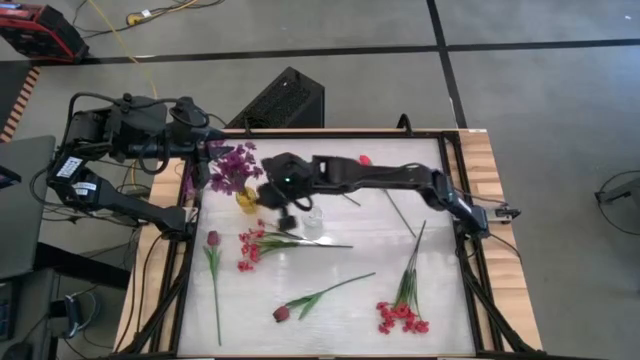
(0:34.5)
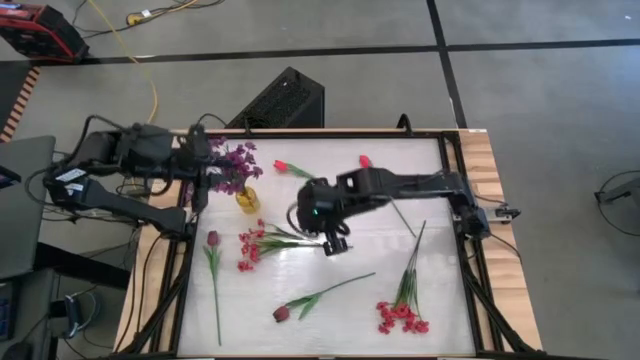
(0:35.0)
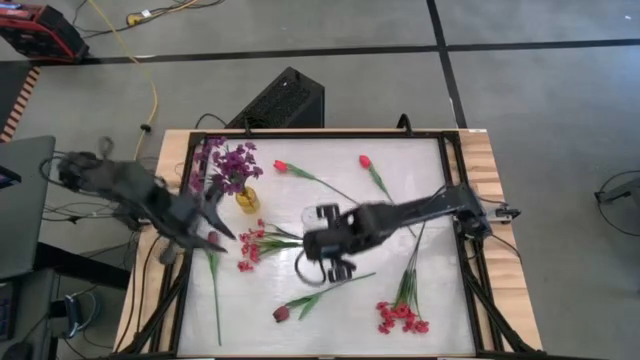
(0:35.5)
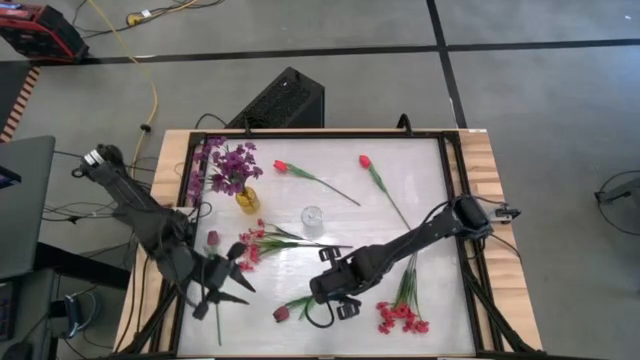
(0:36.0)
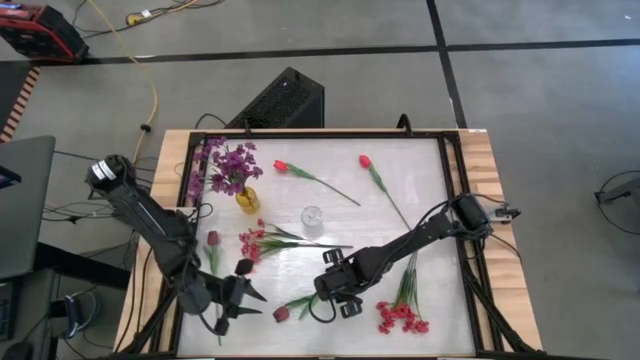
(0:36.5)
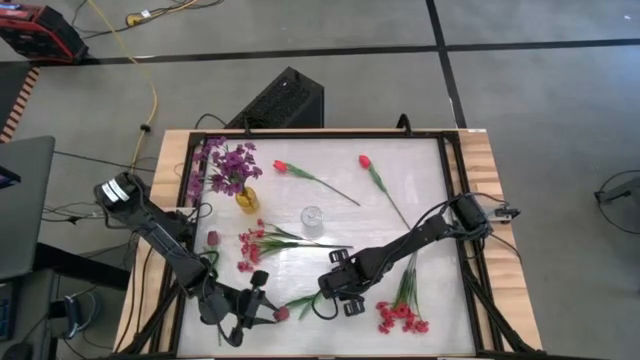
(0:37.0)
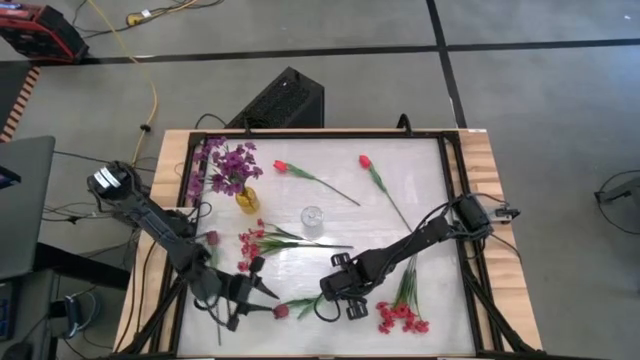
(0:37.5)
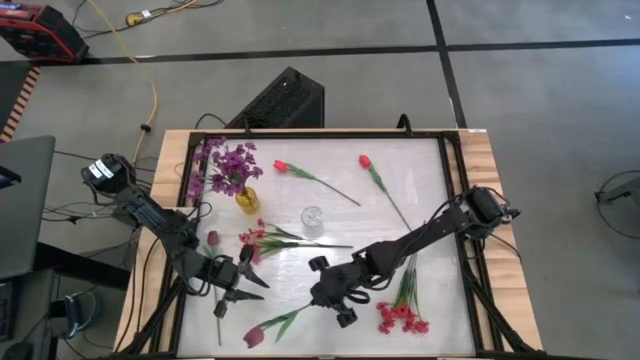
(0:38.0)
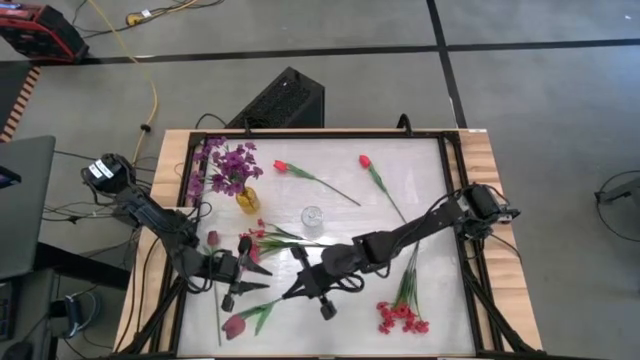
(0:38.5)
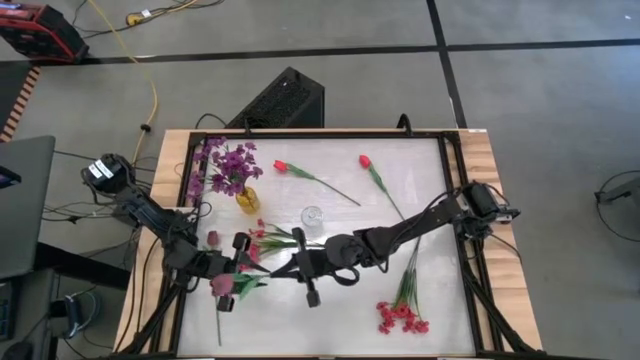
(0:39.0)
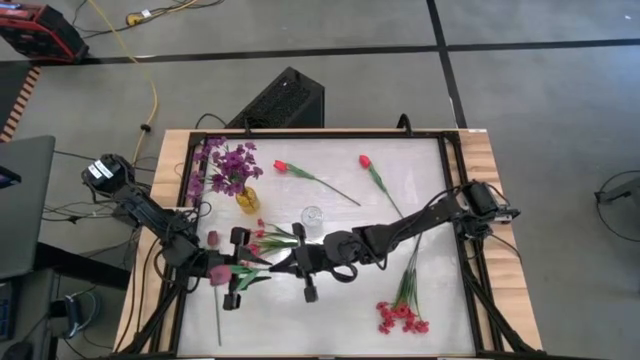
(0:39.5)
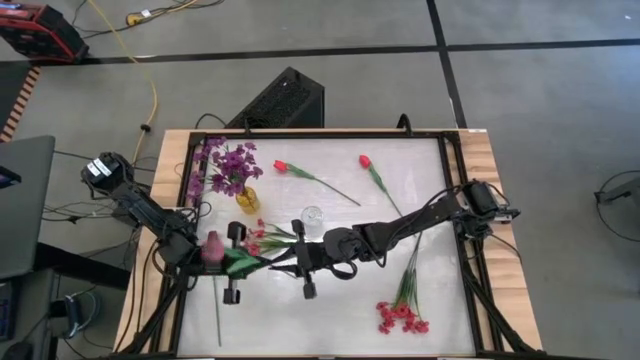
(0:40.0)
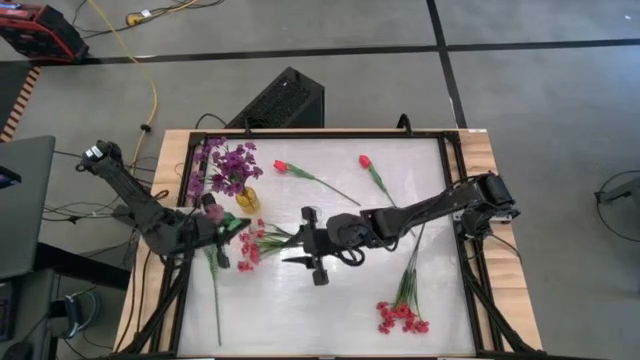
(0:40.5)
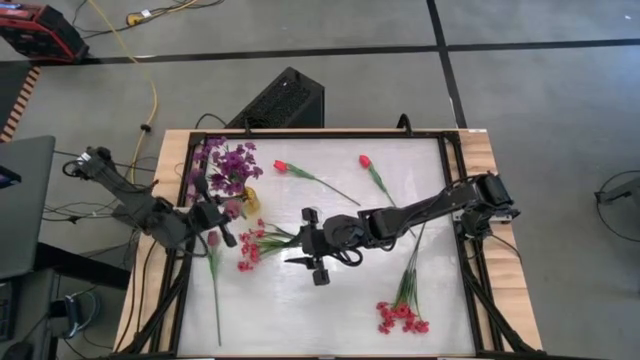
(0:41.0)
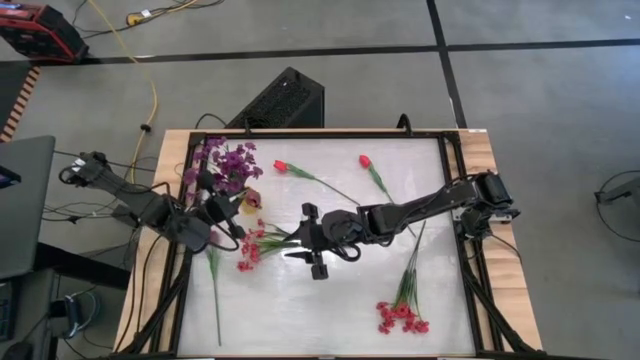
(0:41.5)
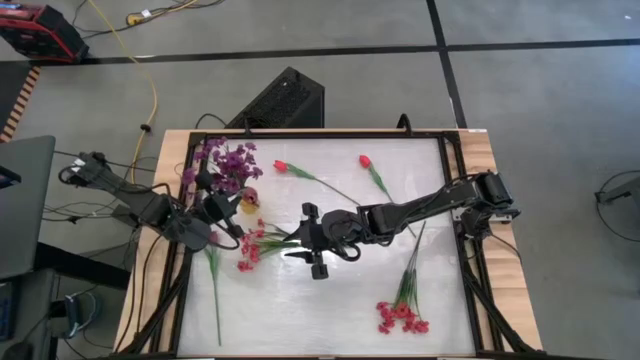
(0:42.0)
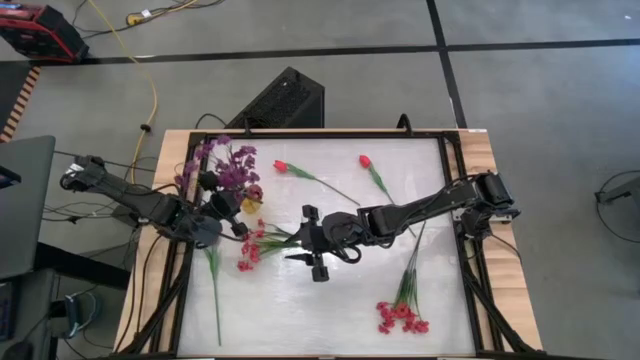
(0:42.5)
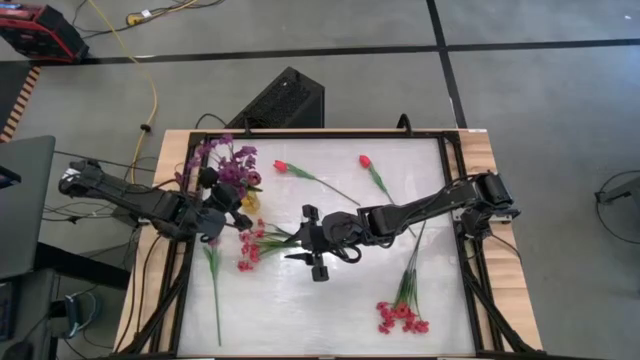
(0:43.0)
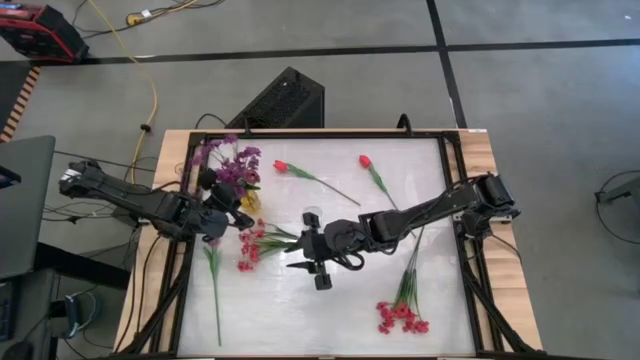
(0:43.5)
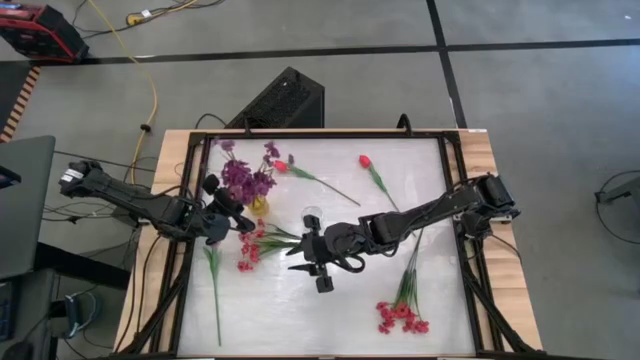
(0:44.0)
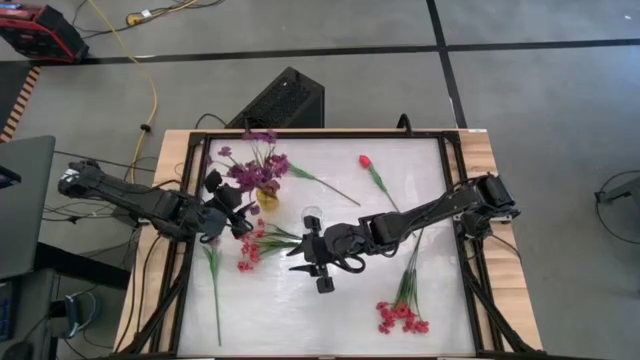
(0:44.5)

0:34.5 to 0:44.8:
Task: Sort flowers into vase by color
Put the bottom right dark red tulip into the yellow vase

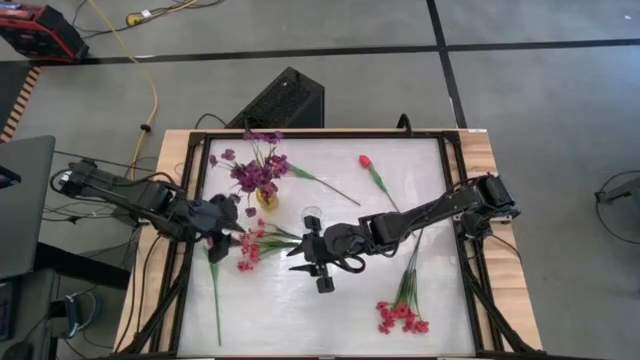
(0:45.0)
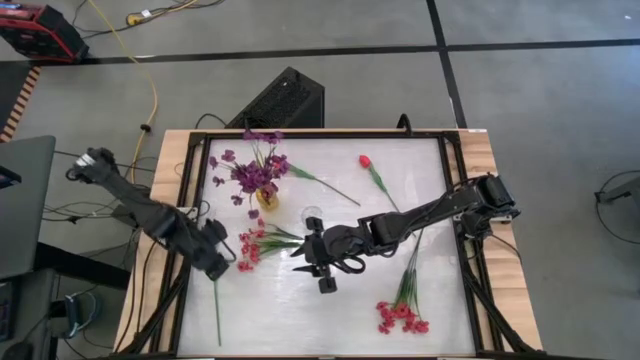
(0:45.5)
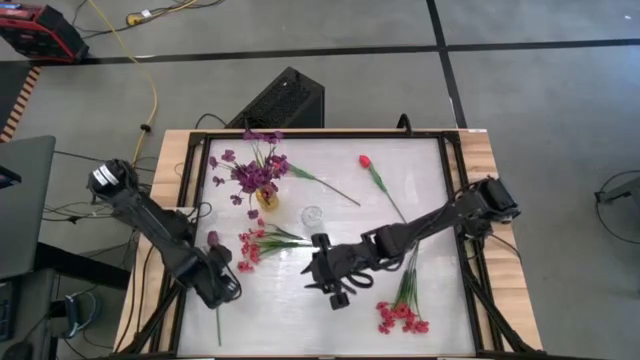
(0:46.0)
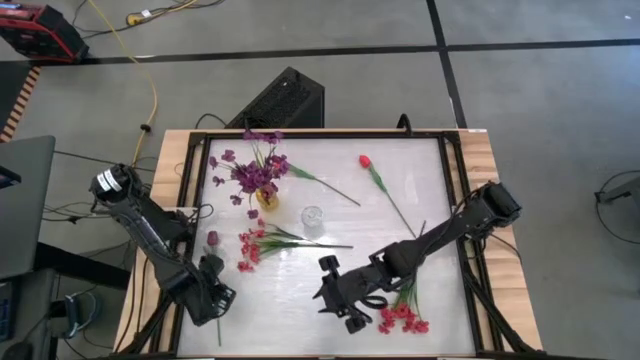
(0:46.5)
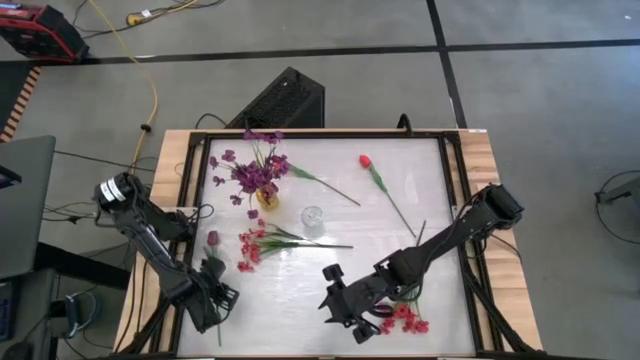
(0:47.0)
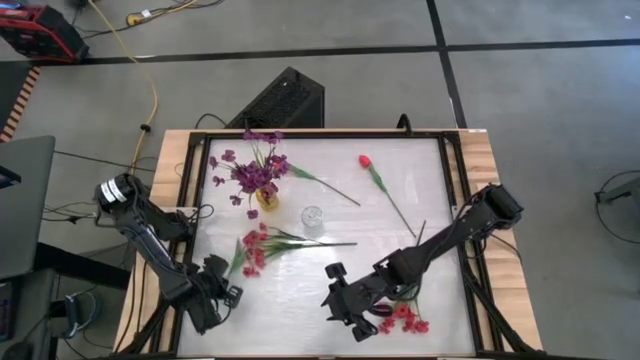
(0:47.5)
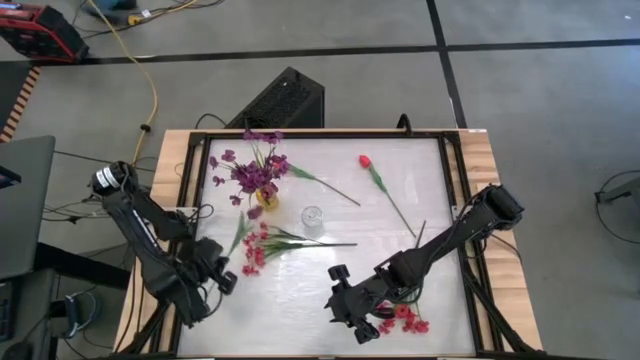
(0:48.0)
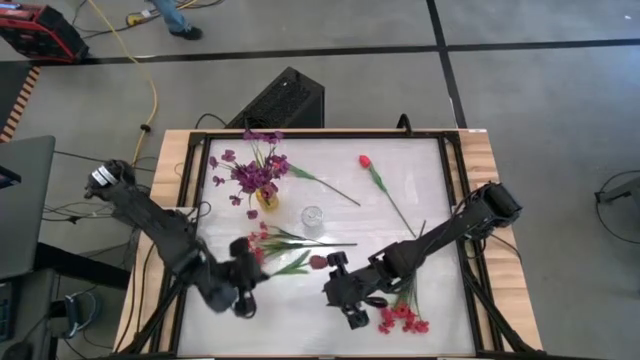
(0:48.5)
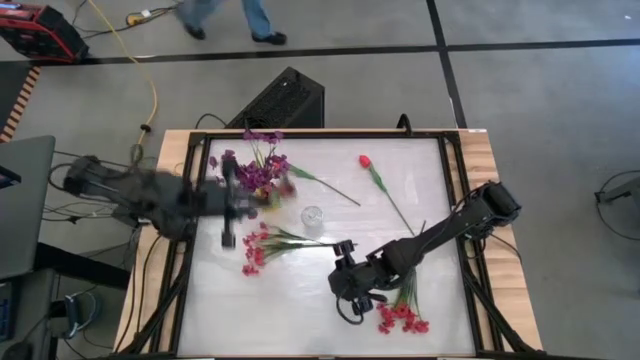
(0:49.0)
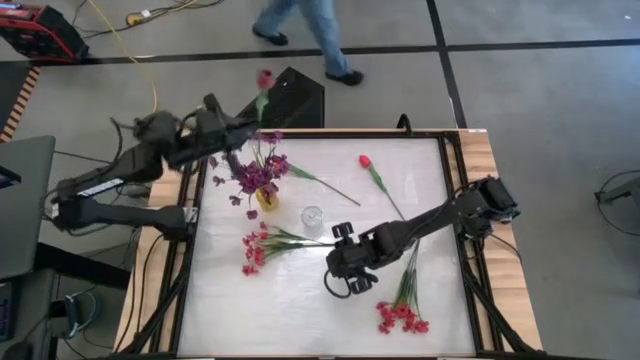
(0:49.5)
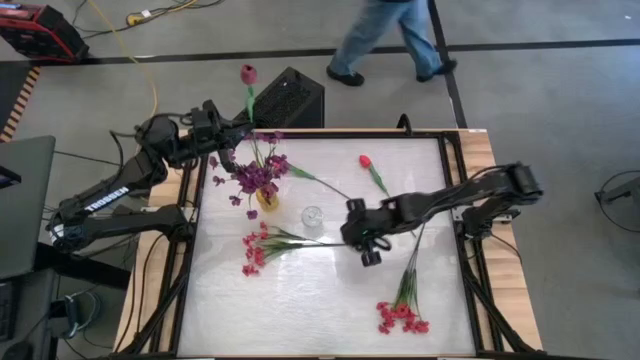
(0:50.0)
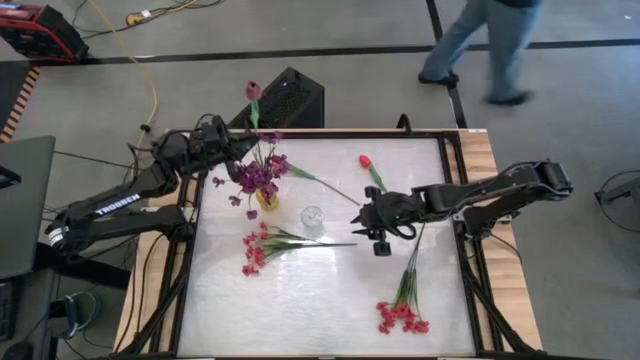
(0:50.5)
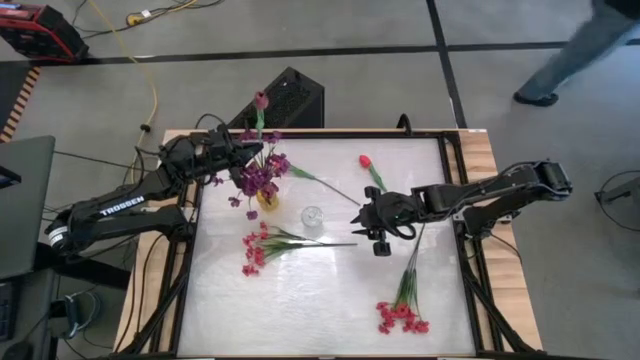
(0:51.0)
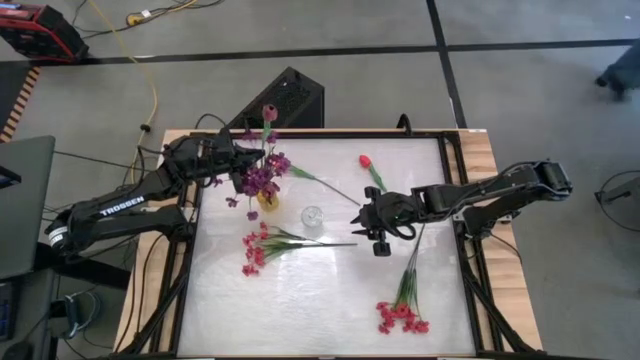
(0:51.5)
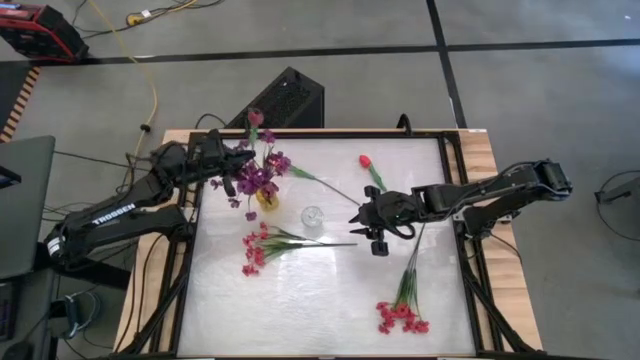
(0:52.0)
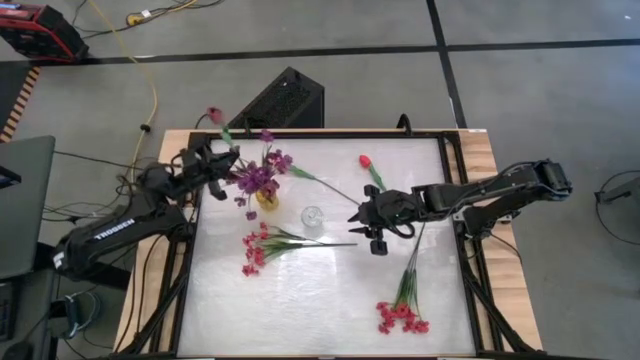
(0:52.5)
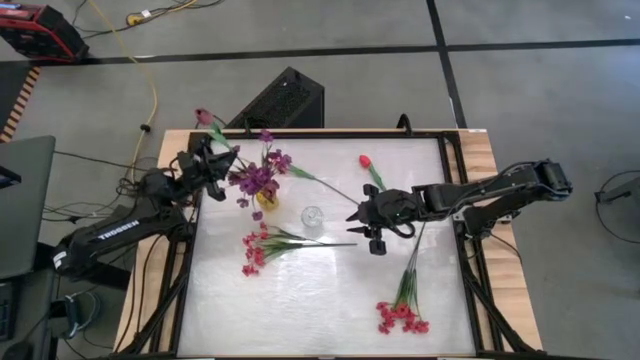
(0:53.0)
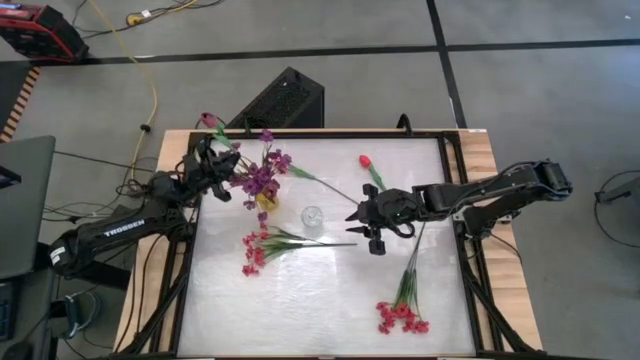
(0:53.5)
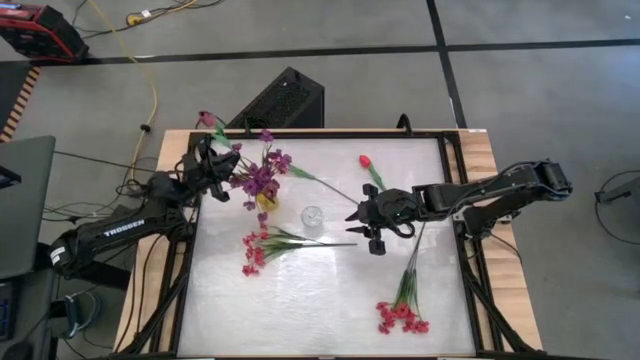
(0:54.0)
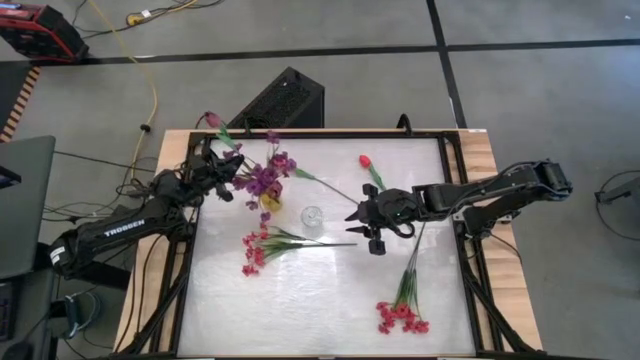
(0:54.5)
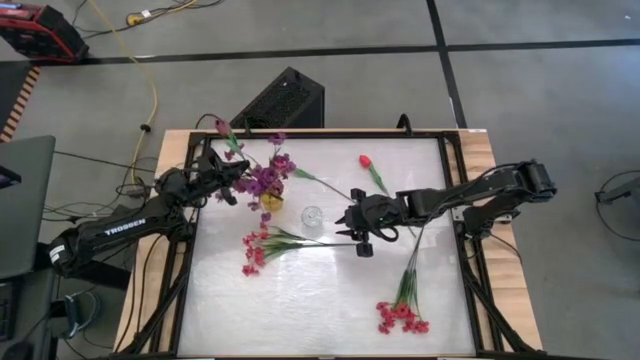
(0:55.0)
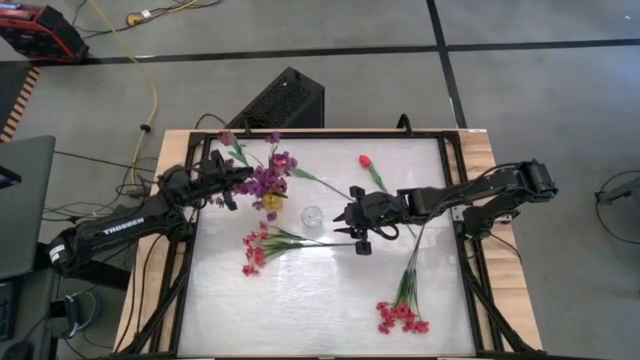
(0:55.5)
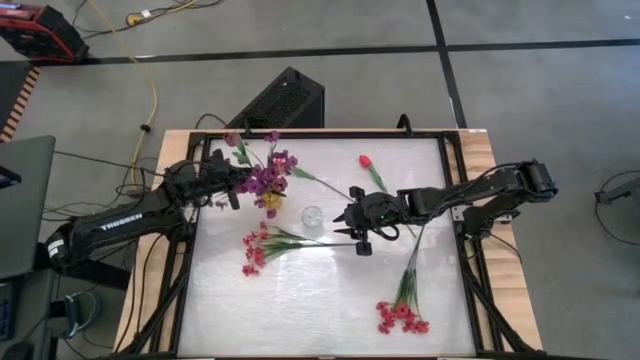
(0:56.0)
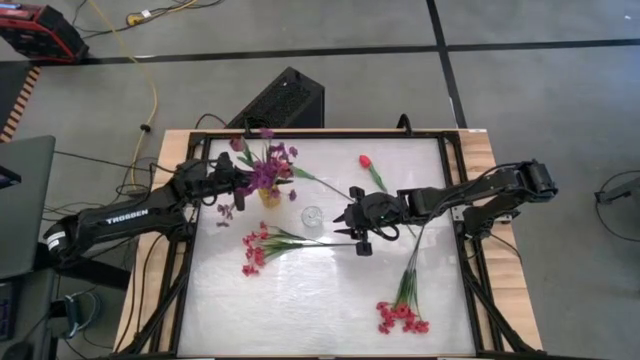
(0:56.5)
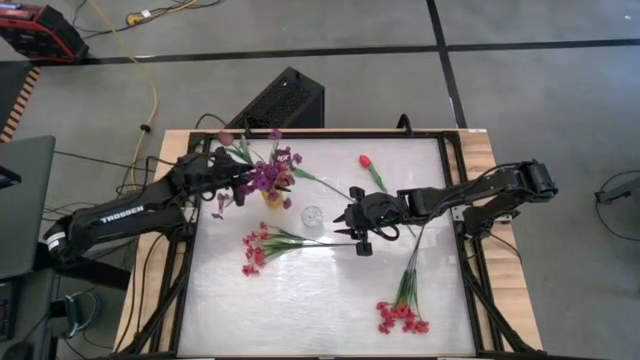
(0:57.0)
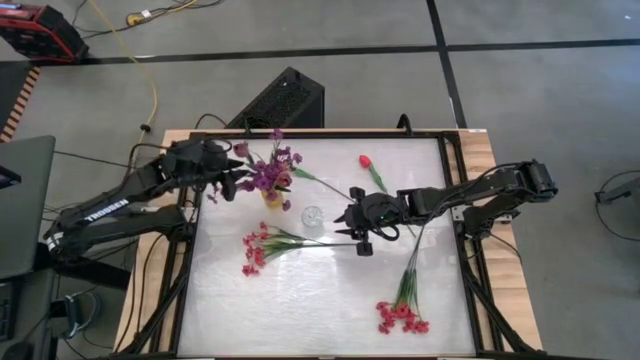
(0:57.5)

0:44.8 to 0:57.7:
Put the dark red tulip into the yellow vase
